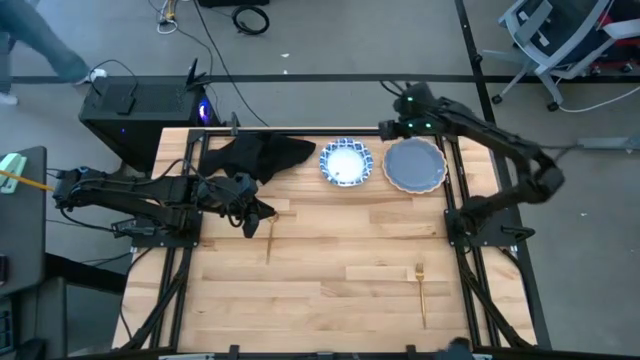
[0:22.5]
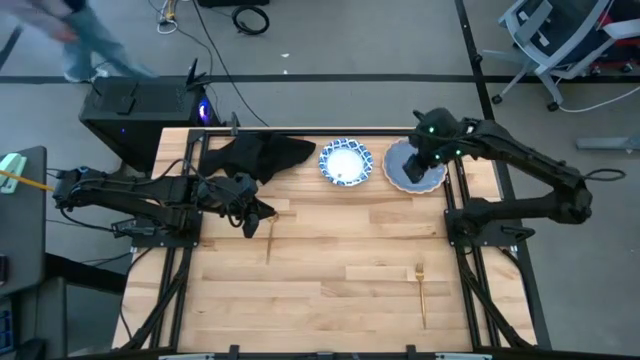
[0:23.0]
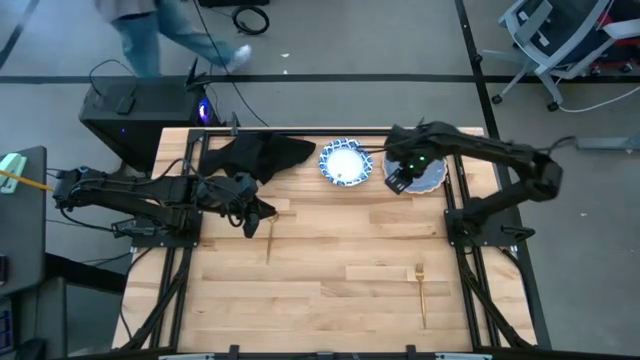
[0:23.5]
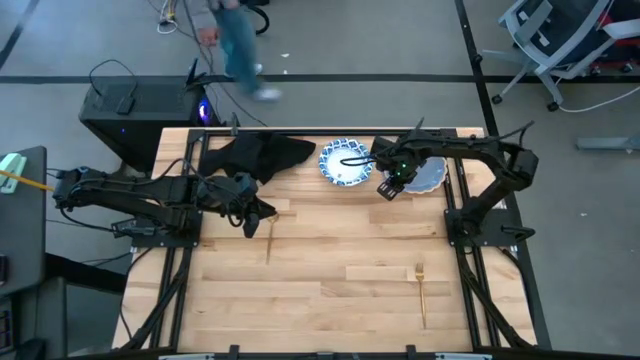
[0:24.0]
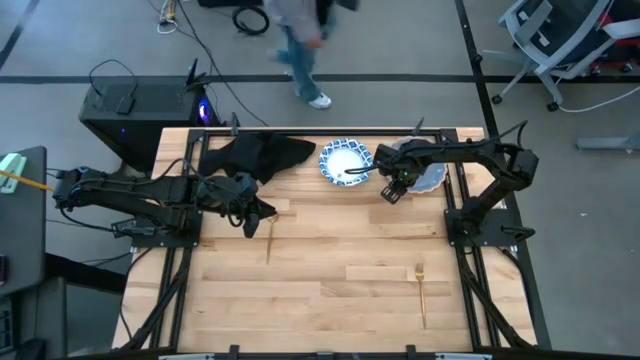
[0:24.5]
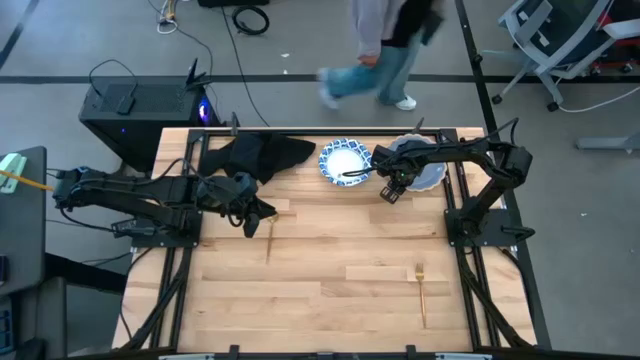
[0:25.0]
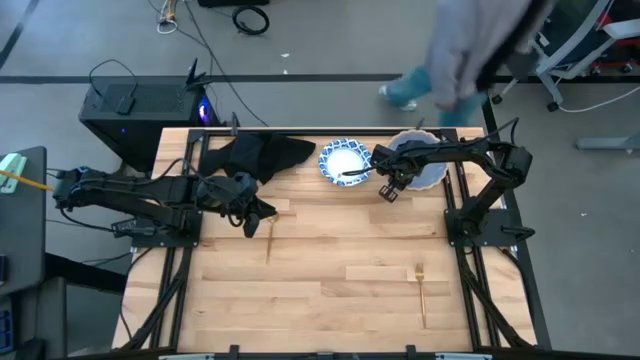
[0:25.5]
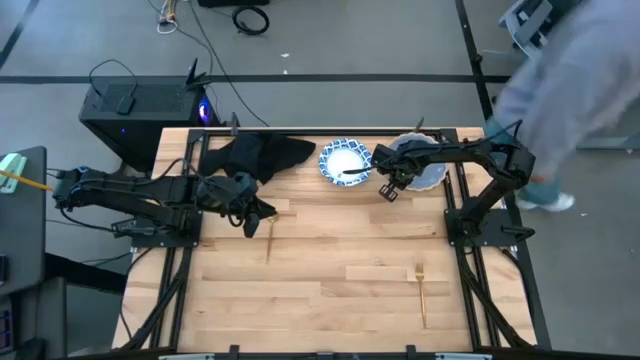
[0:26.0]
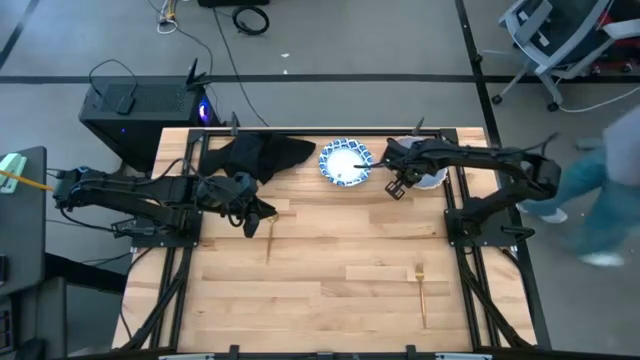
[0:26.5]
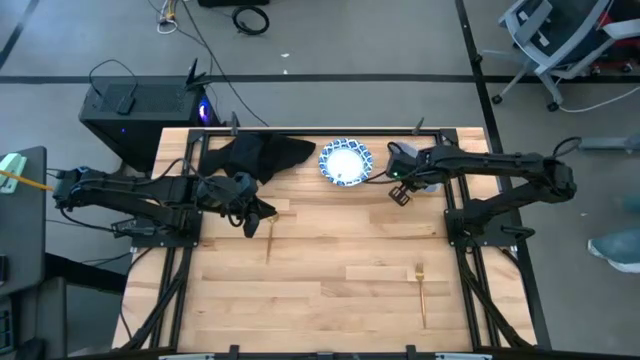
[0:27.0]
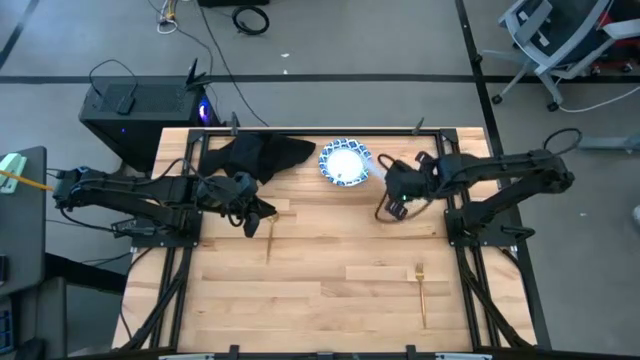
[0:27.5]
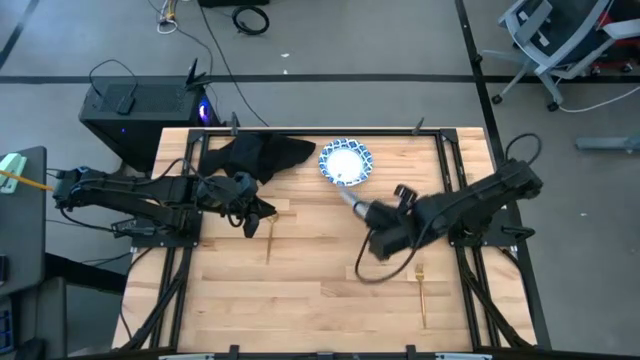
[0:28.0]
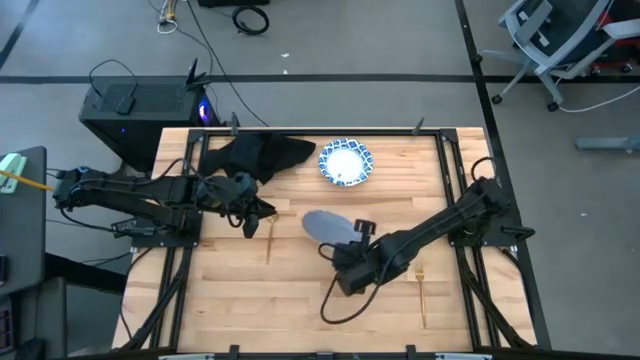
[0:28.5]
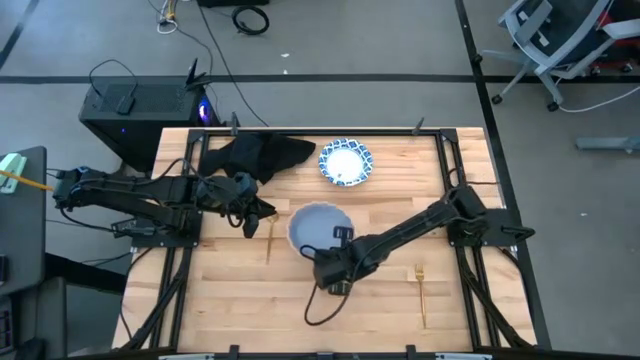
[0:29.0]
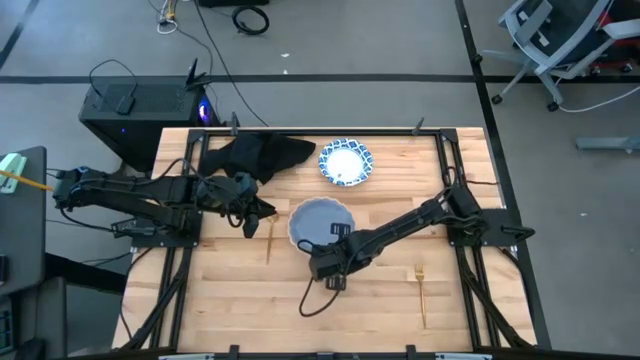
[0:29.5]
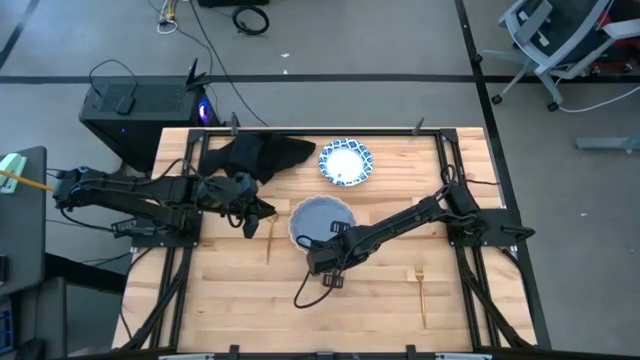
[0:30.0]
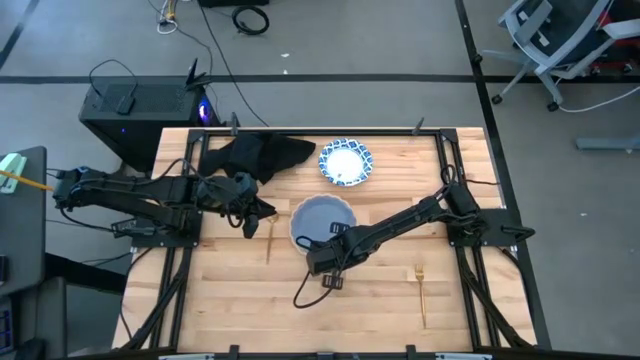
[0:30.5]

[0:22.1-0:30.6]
Task: Set table place
Move the gray plate to the right of the golden spoon

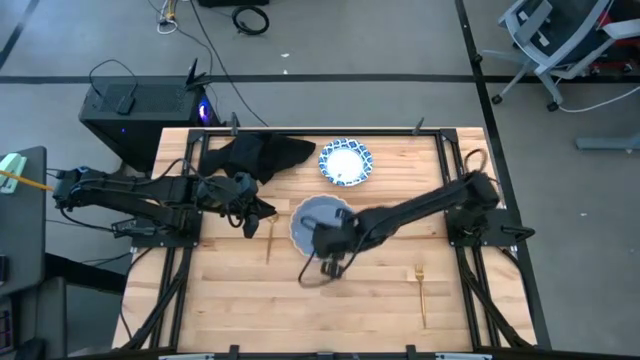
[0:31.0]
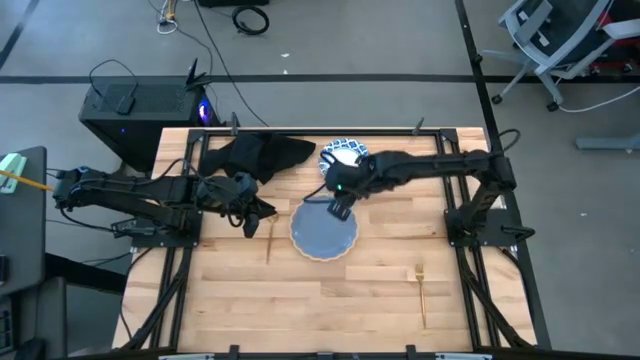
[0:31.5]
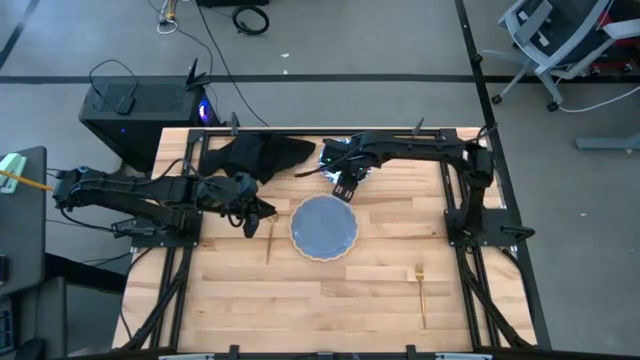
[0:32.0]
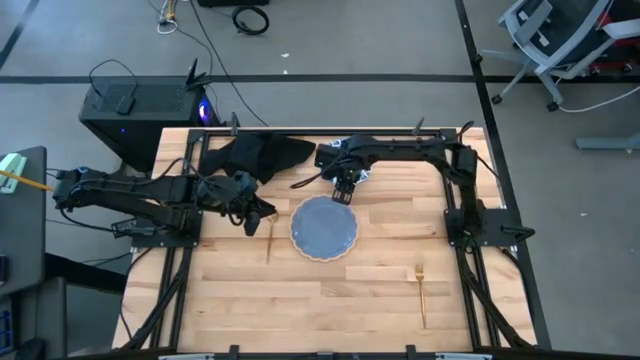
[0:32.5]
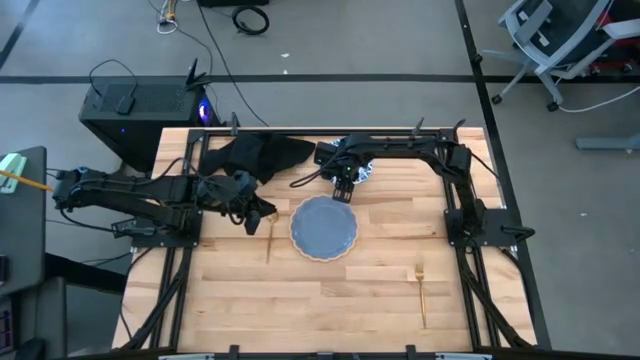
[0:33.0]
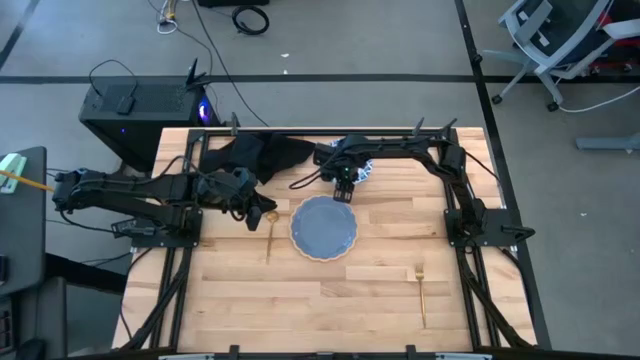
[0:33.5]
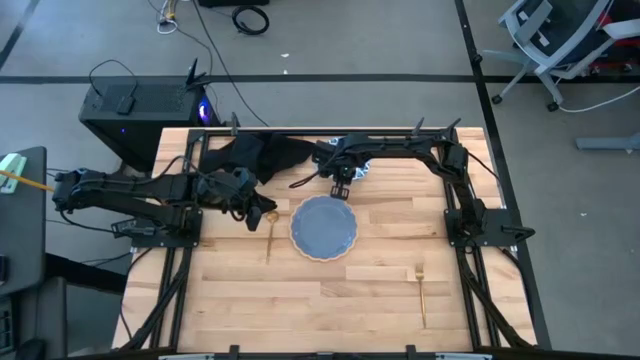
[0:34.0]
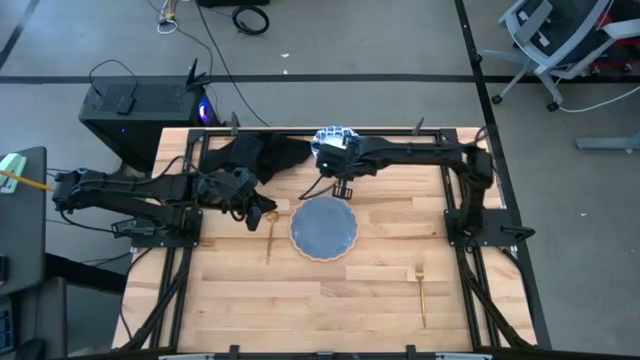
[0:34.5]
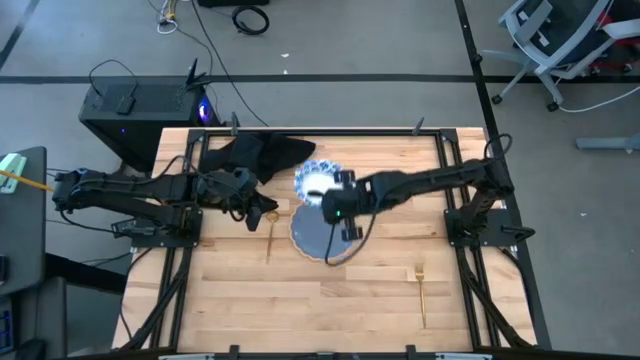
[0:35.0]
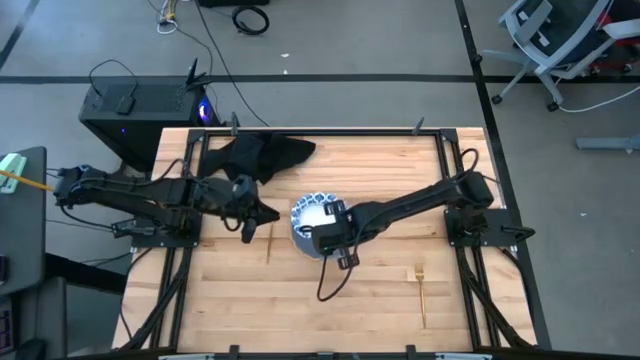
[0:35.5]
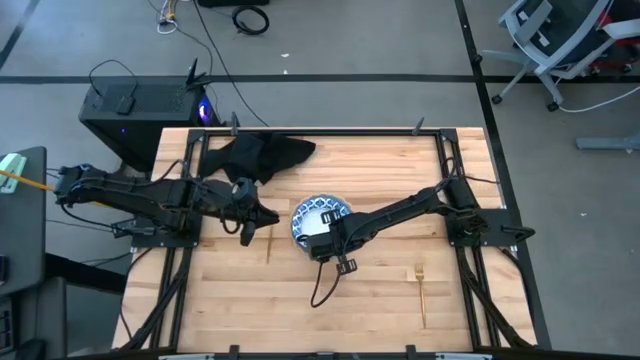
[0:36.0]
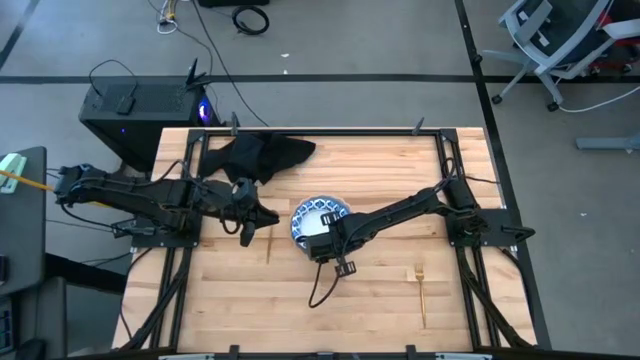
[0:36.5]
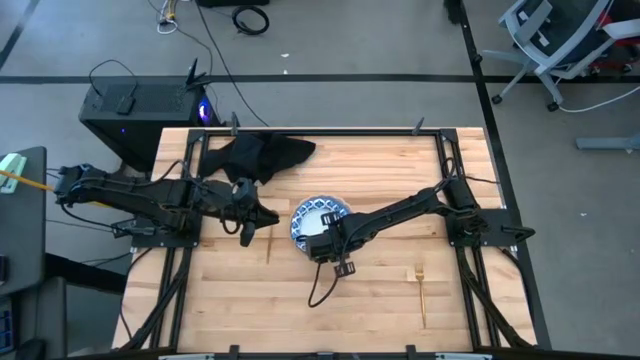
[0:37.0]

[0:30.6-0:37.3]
Put the white bowl on the blue plate

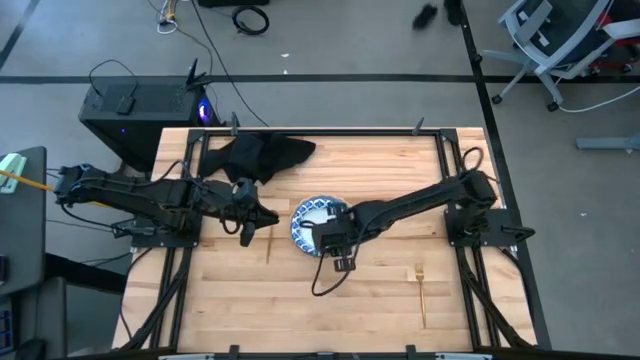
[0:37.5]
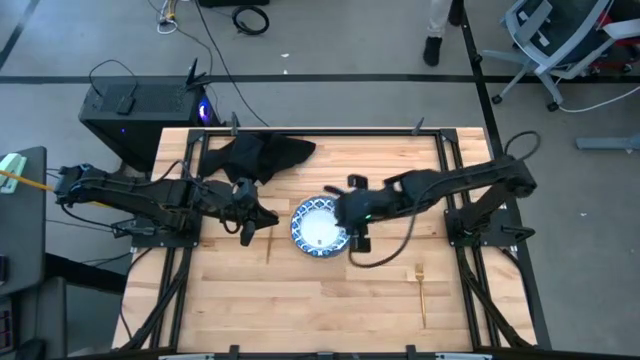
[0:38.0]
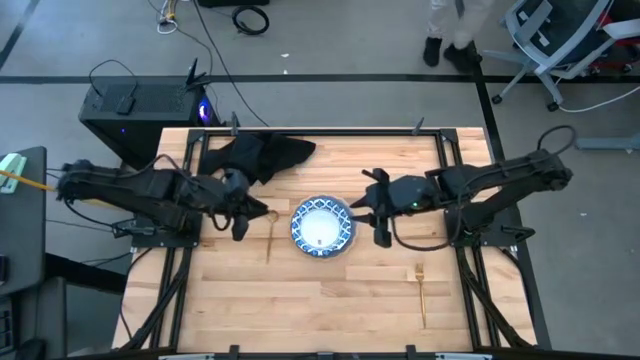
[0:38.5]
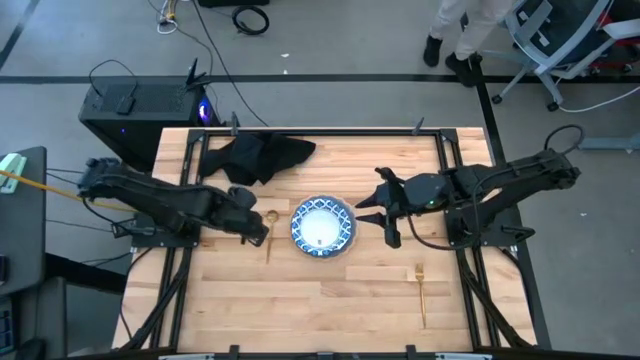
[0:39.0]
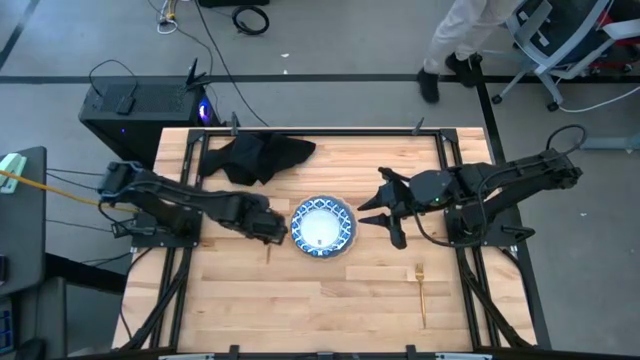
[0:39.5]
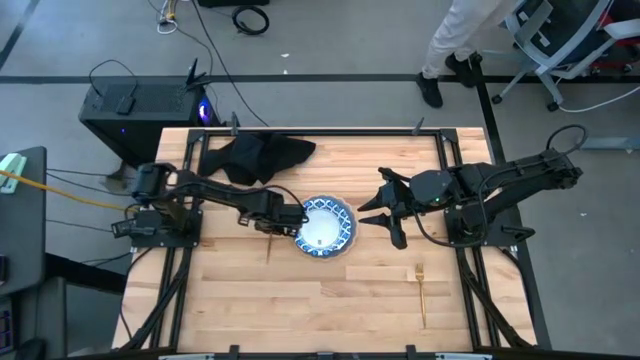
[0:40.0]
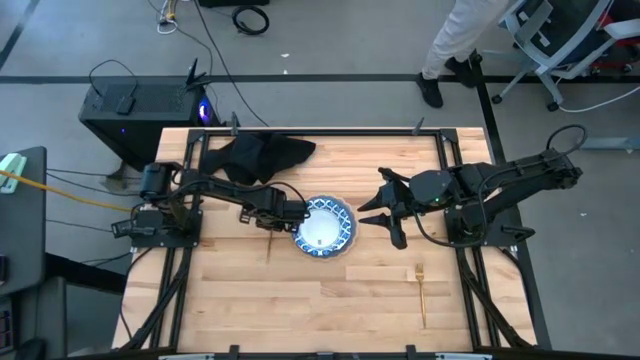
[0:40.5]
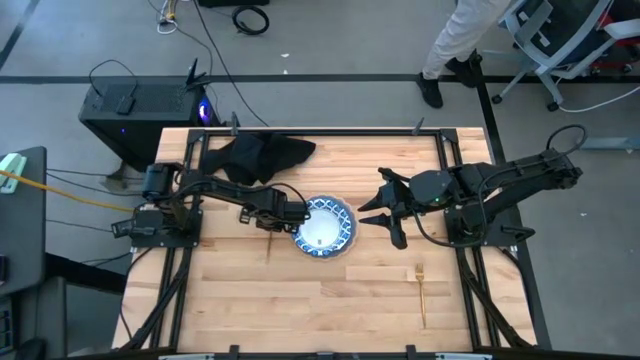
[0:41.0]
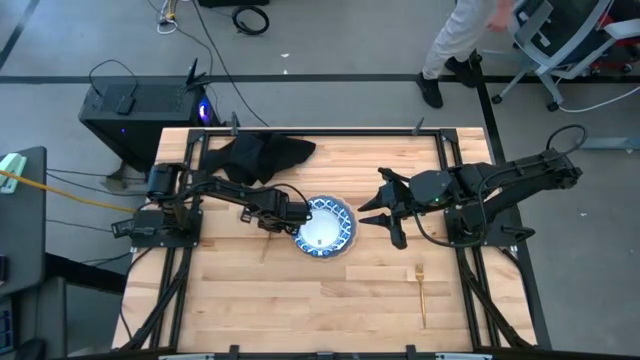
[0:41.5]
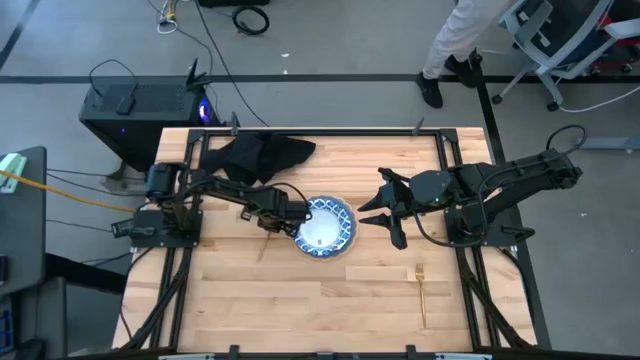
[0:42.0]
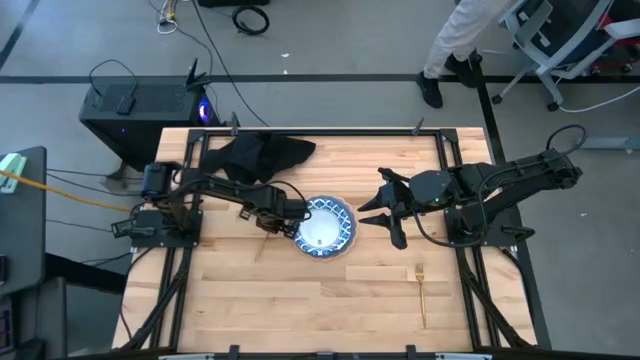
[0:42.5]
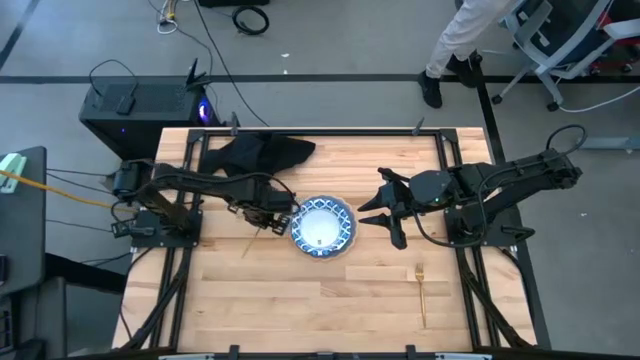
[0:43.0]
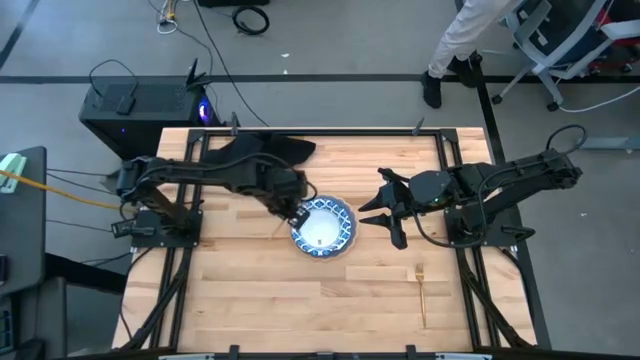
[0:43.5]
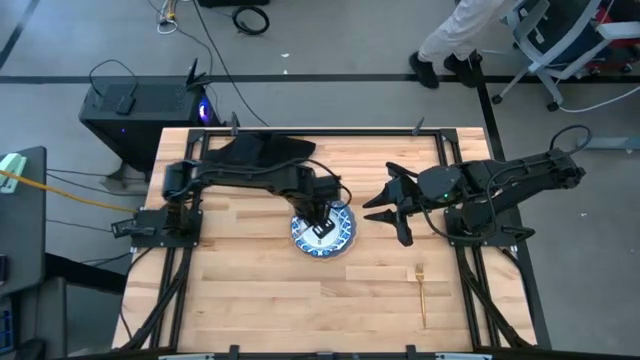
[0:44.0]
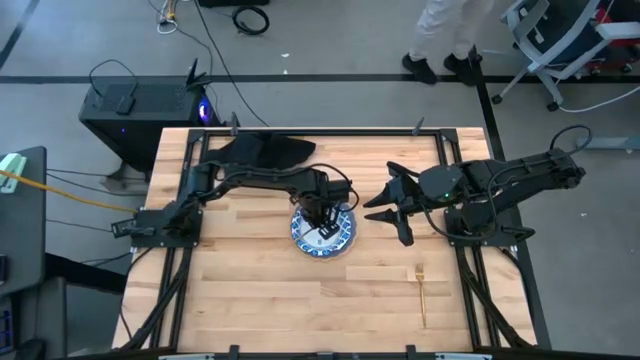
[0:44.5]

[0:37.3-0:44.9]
Put the golden spoon into the white bowl
